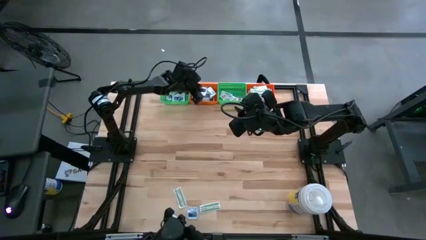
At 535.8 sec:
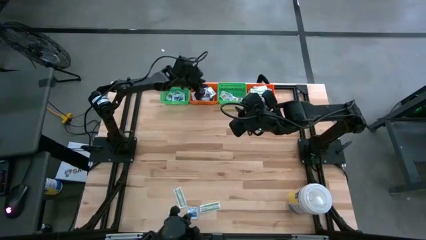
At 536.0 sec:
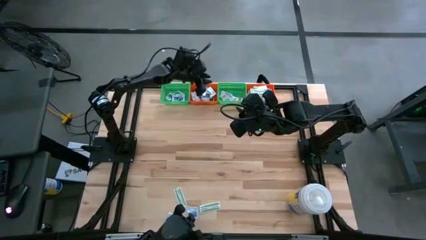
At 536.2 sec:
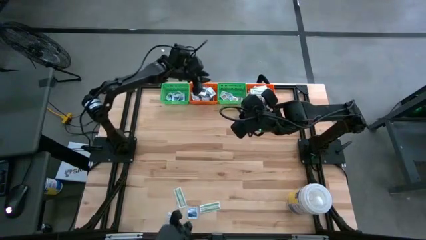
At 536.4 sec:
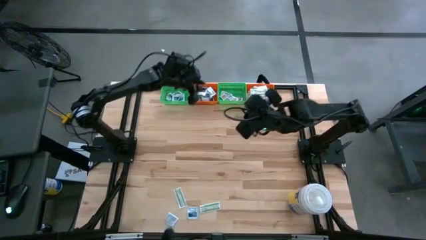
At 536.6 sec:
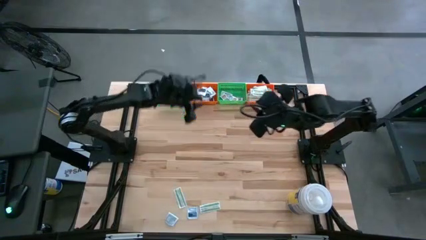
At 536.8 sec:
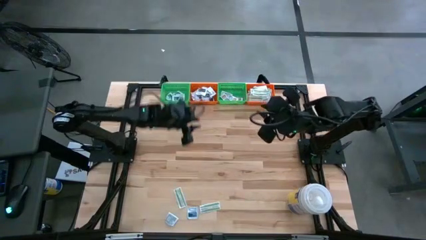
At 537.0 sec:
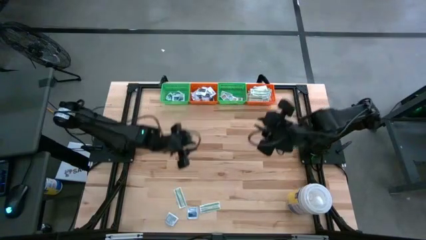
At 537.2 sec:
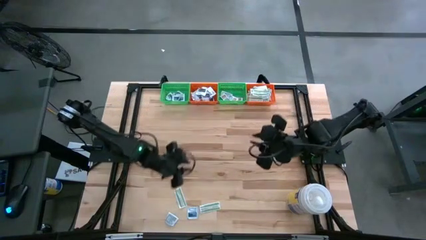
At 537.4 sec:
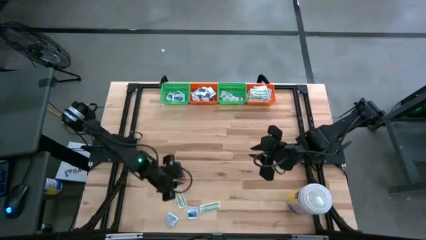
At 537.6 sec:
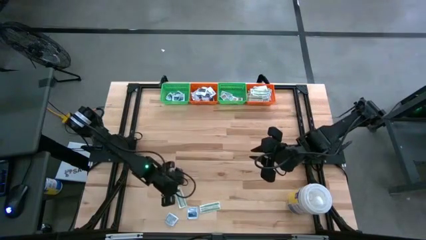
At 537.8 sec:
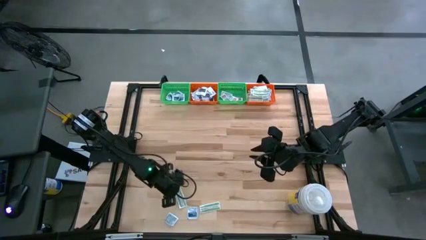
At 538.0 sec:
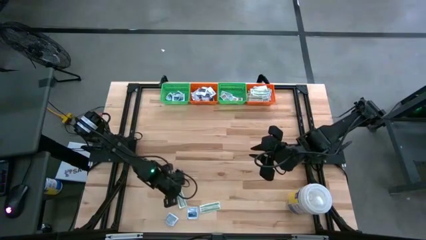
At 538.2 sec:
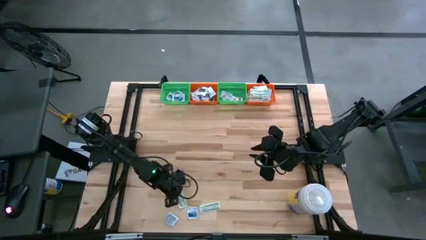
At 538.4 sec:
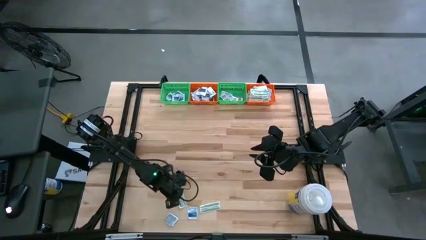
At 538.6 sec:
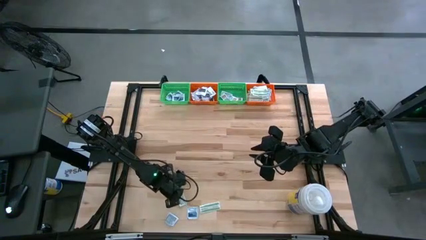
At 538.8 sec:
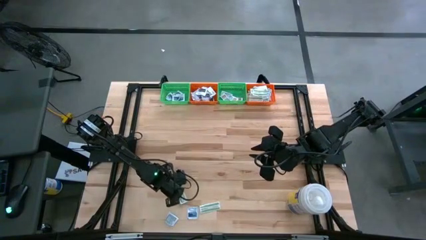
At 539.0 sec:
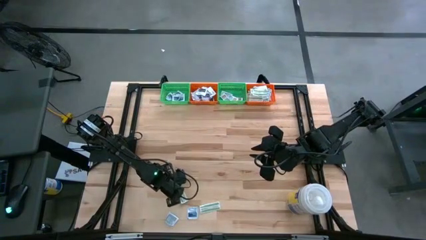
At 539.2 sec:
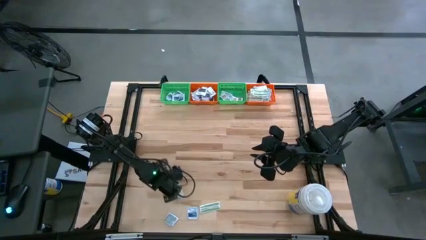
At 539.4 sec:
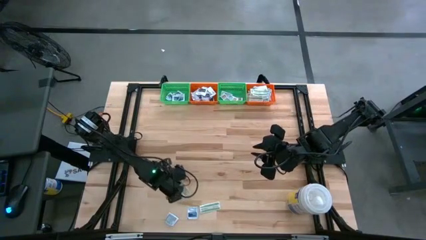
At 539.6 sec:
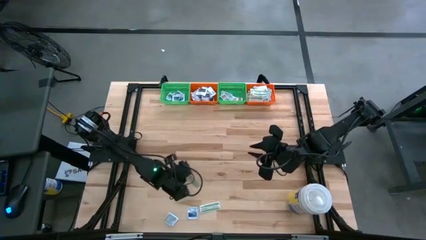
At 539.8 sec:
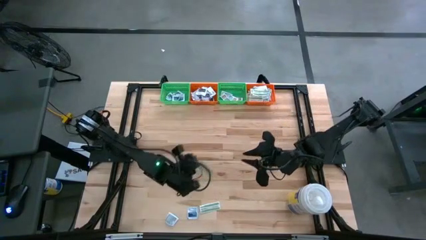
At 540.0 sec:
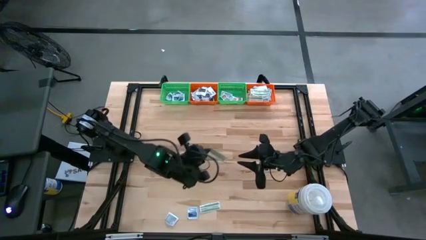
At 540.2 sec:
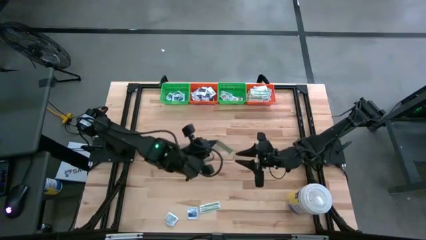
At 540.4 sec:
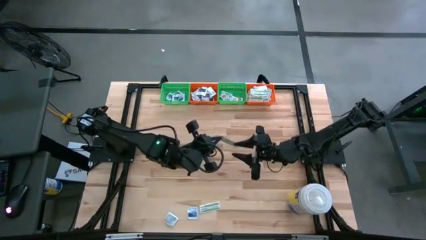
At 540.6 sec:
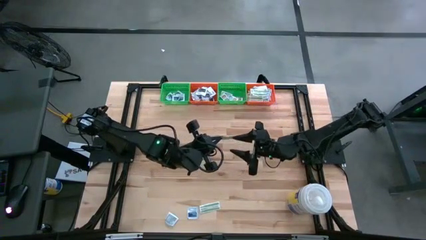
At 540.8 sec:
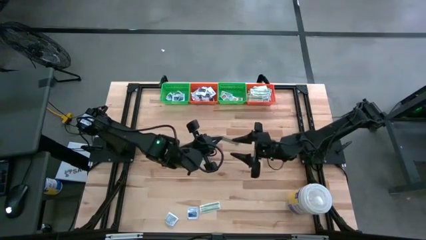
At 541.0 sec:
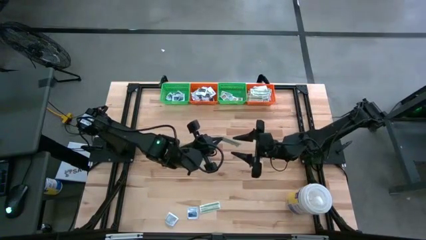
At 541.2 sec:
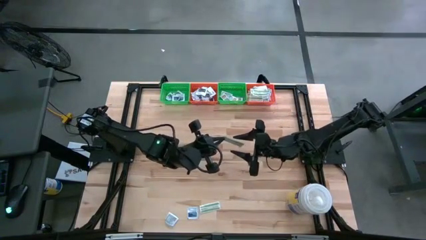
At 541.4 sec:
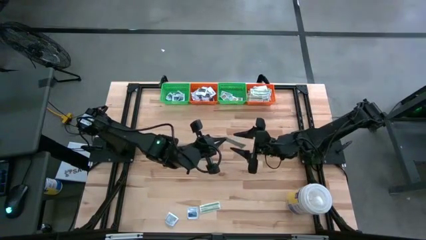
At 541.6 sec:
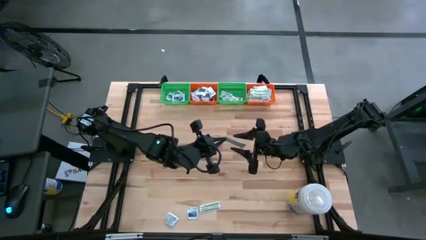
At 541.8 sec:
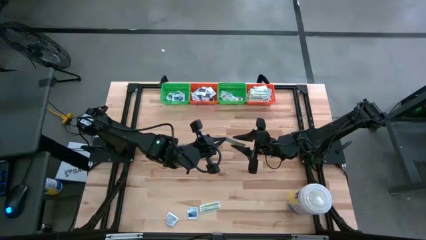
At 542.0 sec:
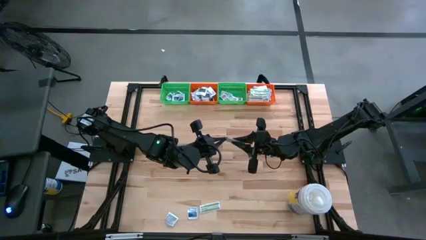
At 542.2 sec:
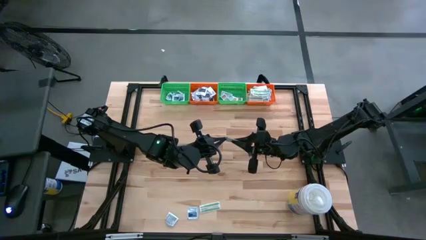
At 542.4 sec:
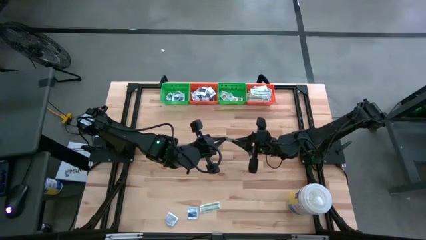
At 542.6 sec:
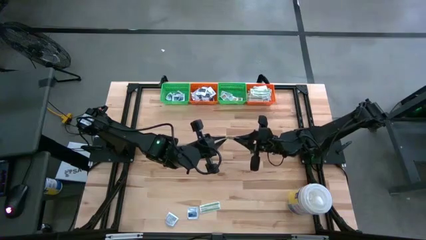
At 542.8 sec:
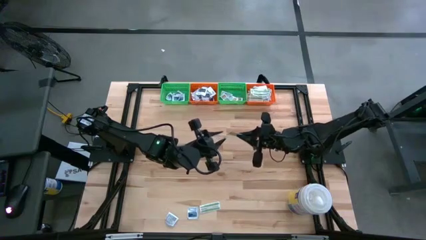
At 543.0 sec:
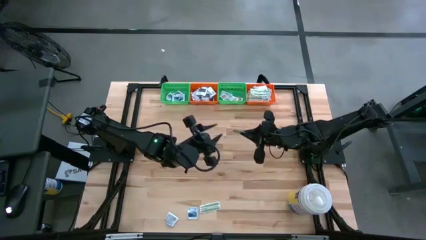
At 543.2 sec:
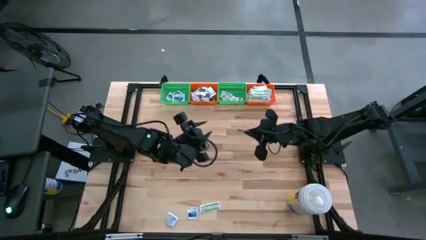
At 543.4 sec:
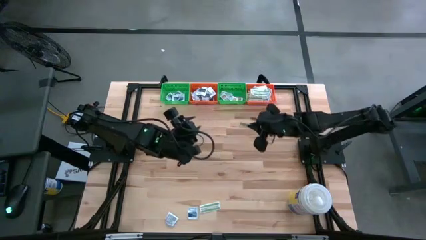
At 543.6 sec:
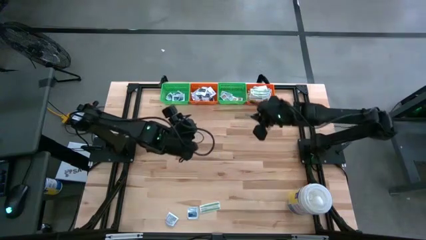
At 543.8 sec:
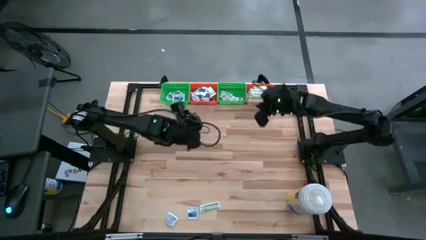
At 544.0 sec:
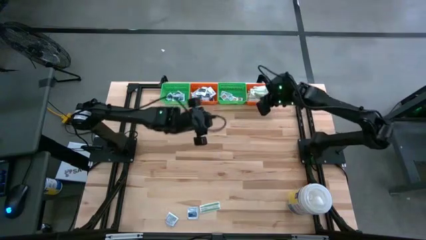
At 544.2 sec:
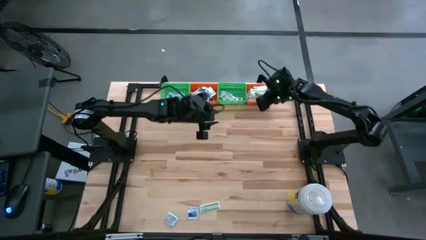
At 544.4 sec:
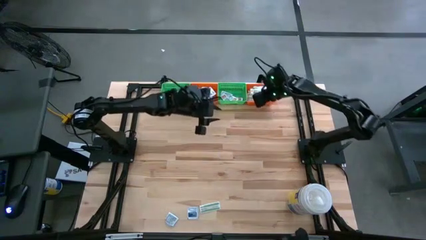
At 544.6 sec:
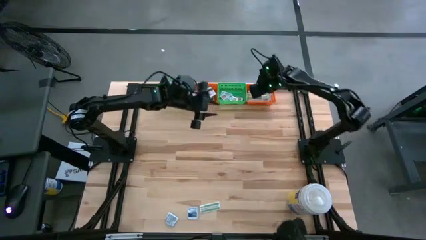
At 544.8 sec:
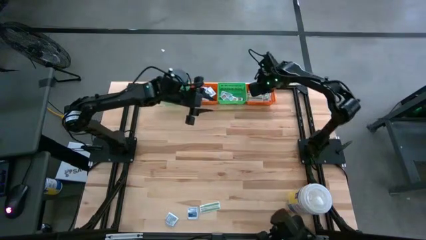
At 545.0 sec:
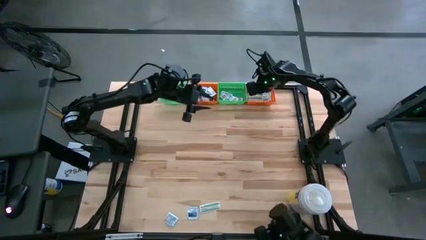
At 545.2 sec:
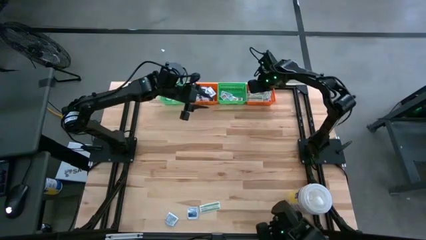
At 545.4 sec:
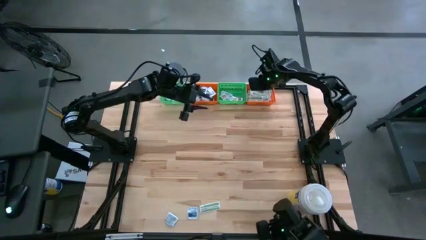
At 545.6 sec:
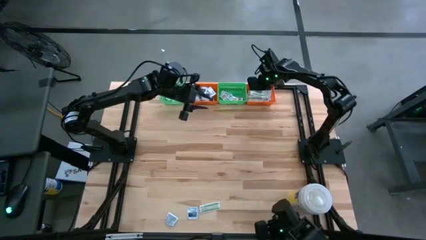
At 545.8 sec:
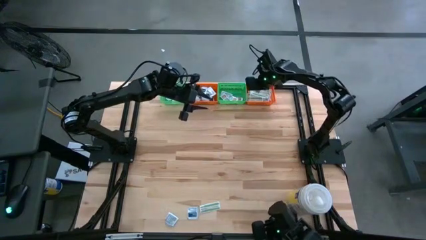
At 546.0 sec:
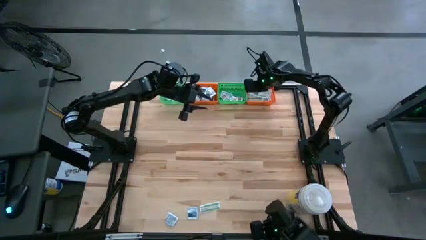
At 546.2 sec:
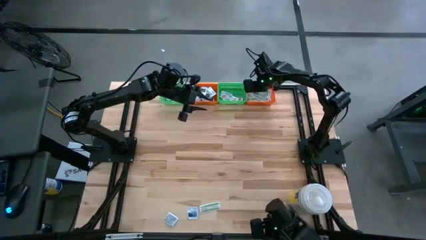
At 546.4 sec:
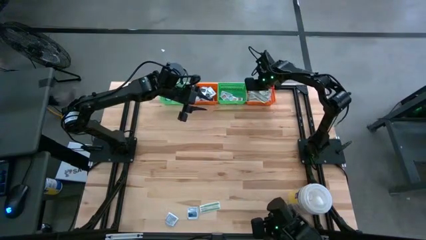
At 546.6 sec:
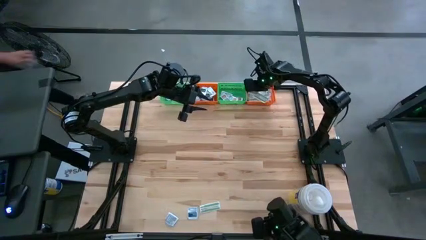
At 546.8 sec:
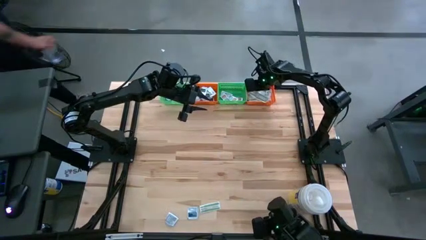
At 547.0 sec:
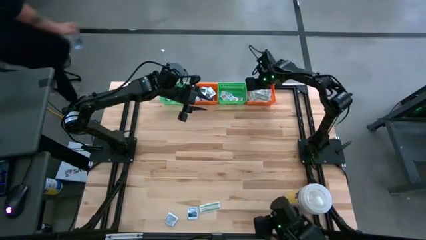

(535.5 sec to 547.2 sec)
Task: Pick & Place First Aid Supplies
Put the left green bandage pack in the right orange bin

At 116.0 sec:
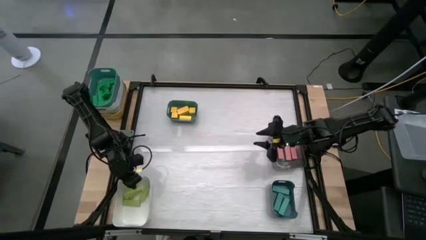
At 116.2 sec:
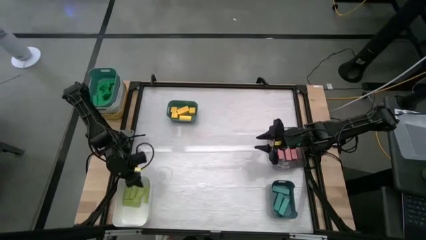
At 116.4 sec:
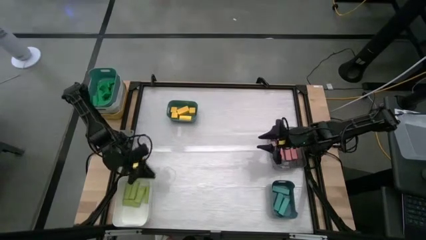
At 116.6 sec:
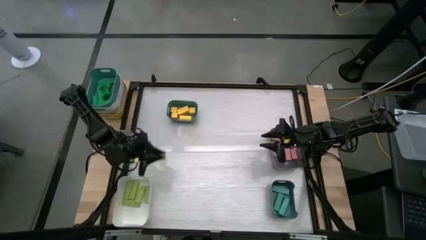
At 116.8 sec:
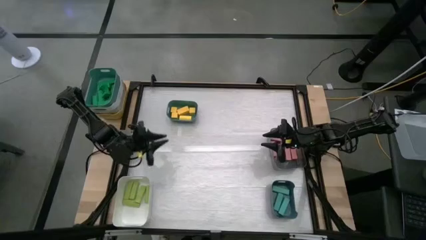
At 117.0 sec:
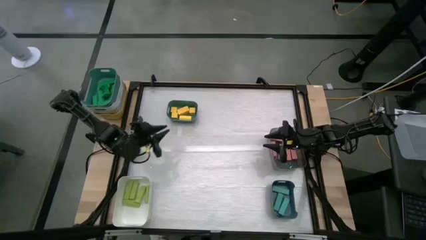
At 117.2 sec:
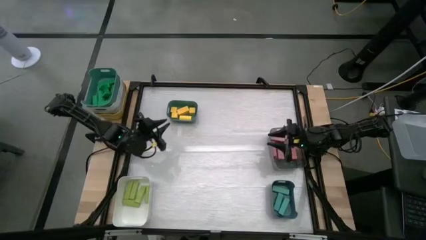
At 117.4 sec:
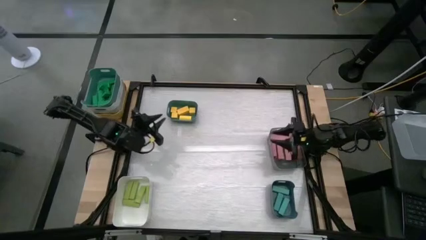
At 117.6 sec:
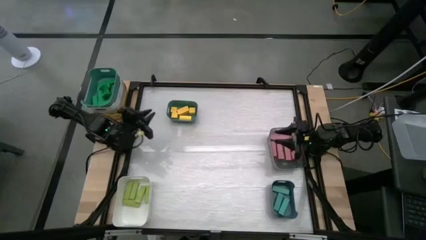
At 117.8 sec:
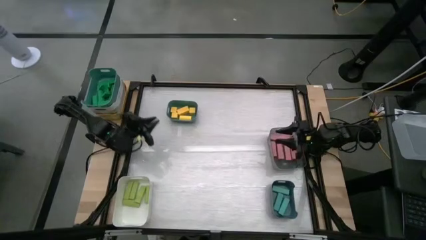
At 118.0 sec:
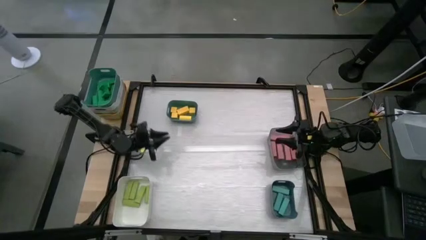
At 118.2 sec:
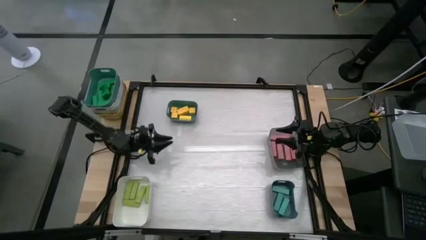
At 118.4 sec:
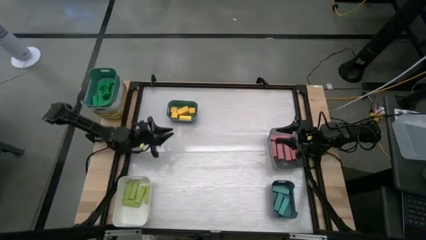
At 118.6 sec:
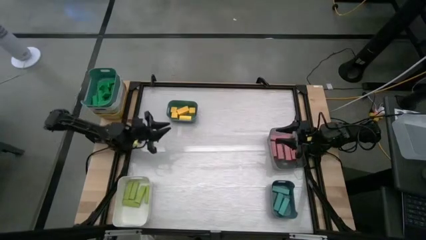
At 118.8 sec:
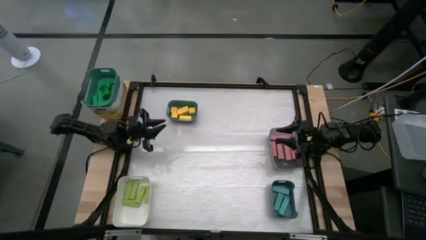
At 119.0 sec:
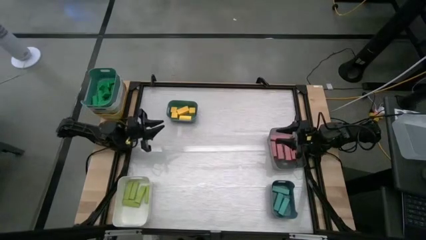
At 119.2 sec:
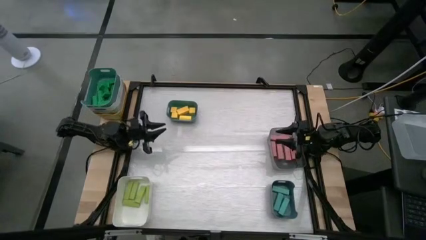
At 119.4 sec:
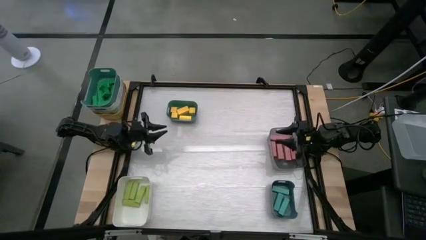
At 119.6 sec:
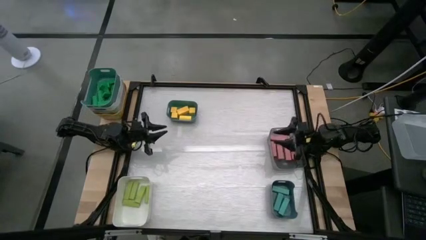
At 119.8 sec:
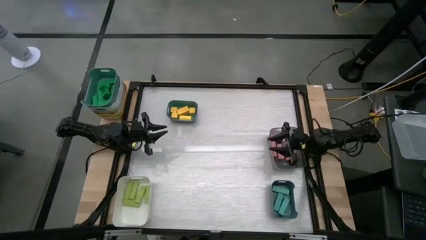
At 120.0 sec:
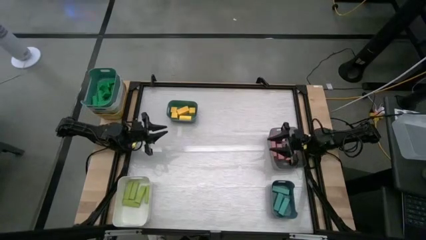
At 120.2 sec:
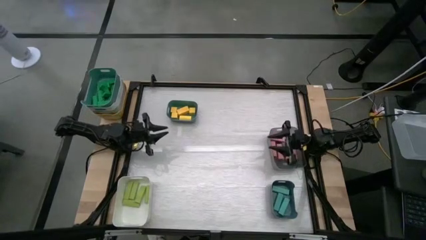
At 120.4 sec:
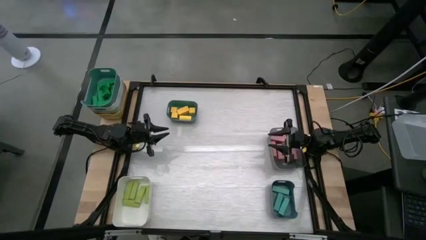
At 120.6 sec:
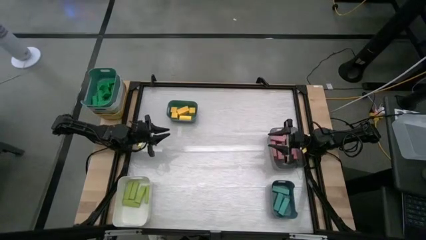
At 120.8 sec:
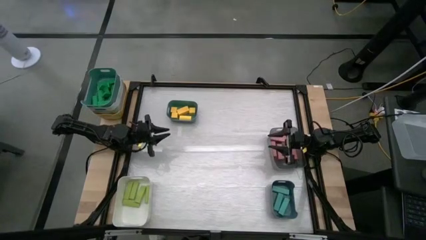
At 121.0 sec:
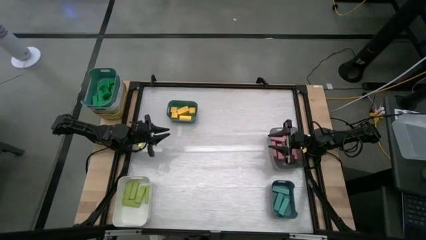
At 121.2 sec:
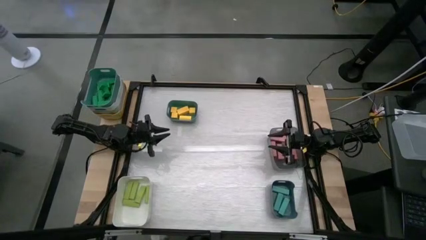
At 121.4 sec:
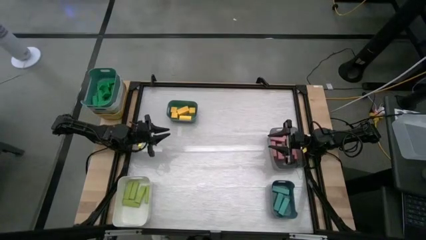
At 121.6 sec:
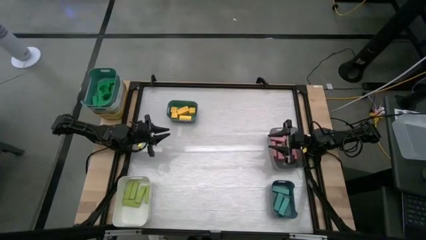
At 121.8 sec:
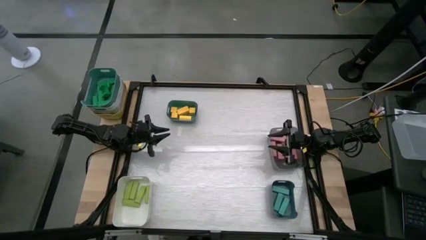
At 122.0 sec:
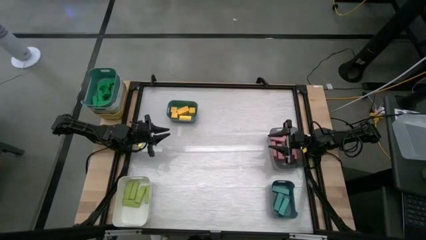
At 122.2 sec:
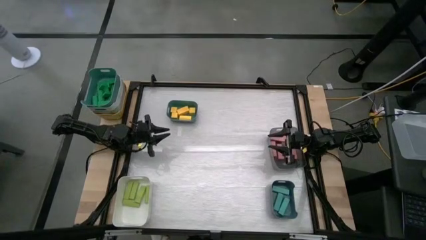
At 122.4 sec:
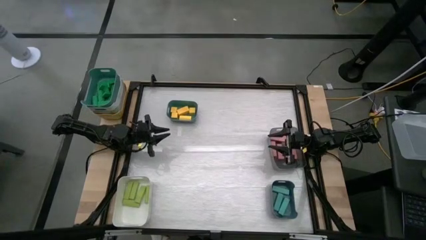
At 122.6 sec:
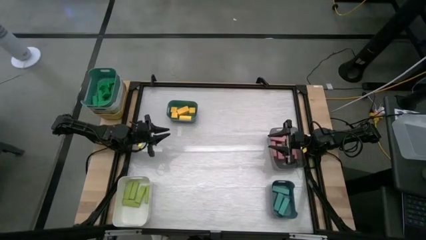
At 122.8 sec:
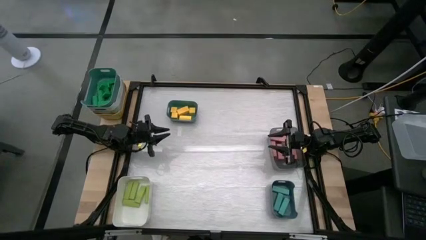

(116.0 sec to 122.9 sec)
Task: Sort blocks
Return to Home Position
